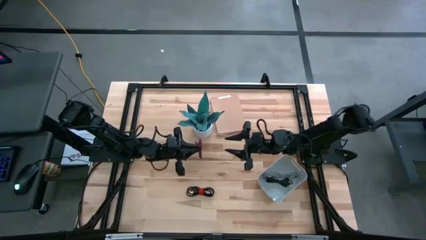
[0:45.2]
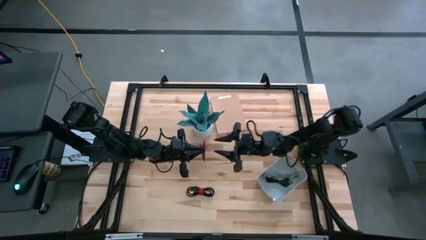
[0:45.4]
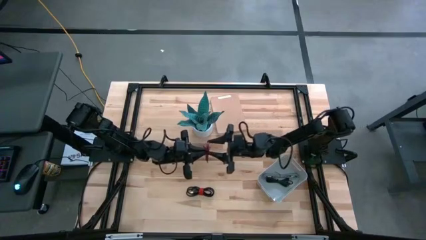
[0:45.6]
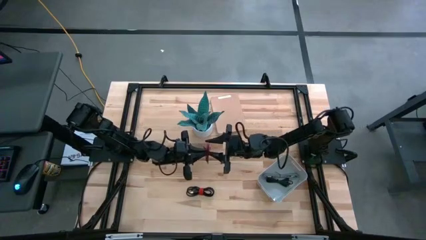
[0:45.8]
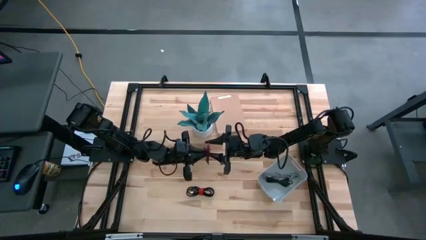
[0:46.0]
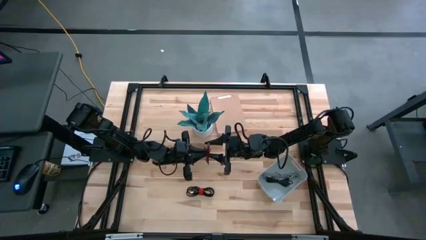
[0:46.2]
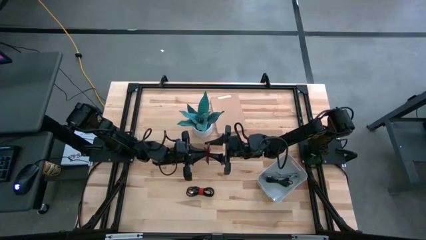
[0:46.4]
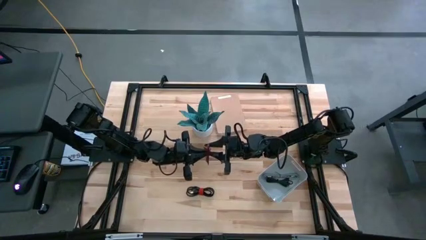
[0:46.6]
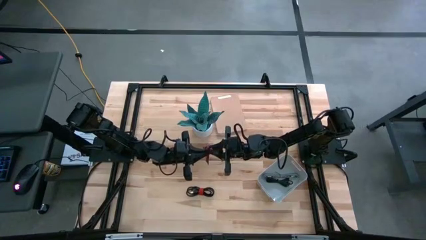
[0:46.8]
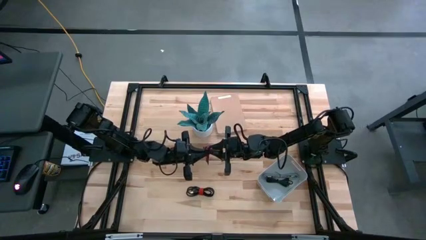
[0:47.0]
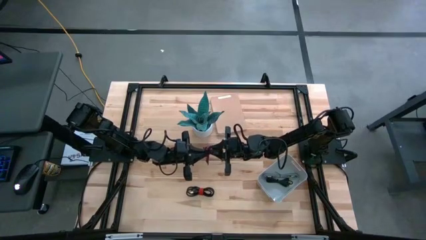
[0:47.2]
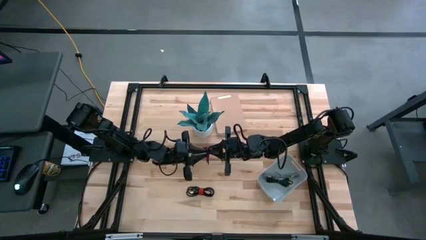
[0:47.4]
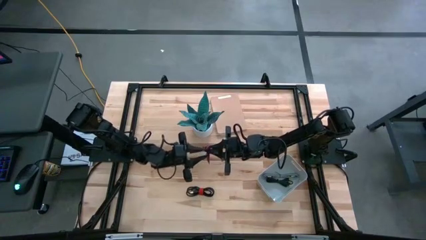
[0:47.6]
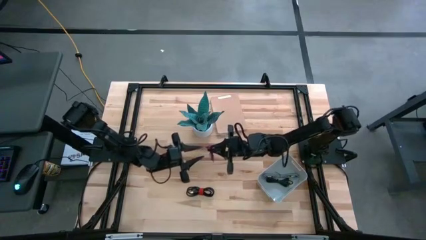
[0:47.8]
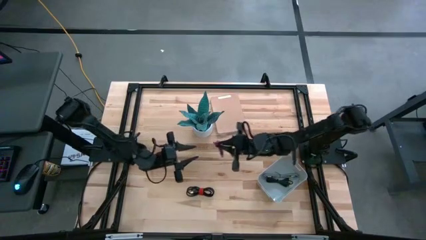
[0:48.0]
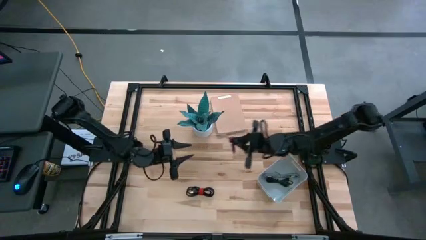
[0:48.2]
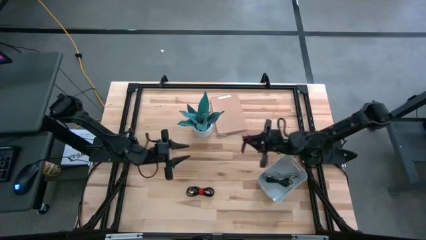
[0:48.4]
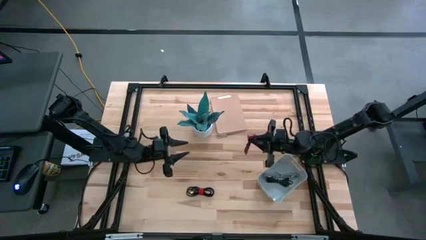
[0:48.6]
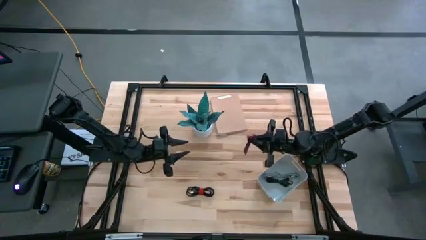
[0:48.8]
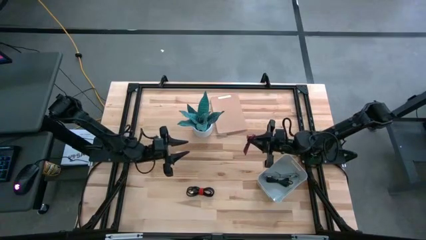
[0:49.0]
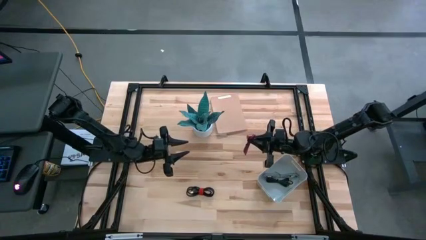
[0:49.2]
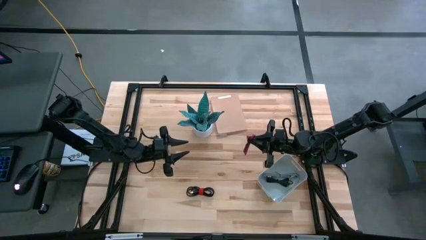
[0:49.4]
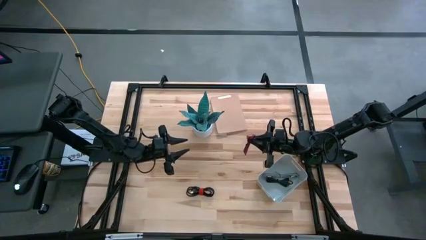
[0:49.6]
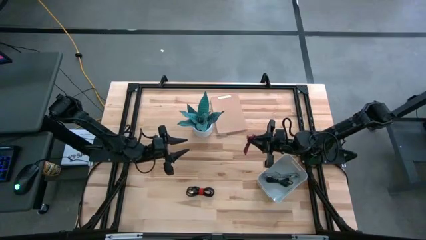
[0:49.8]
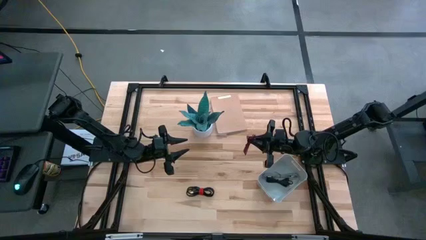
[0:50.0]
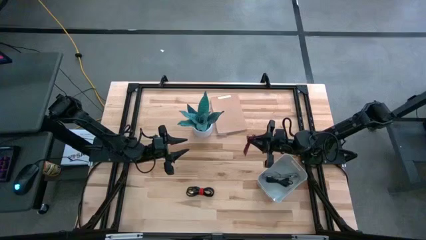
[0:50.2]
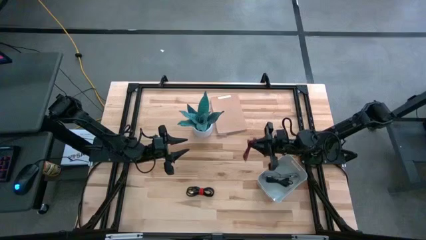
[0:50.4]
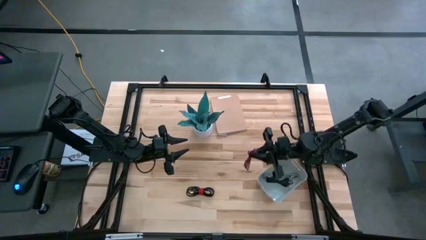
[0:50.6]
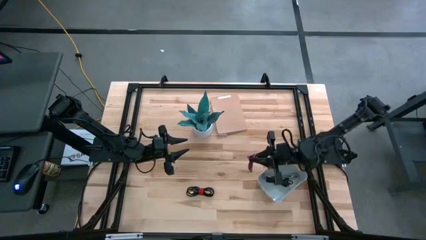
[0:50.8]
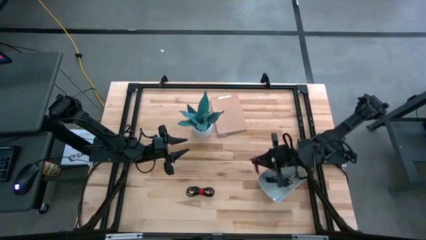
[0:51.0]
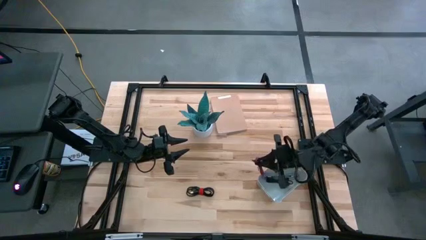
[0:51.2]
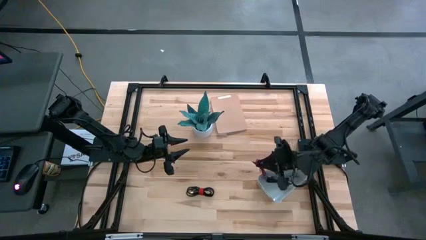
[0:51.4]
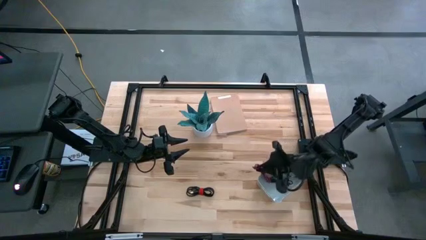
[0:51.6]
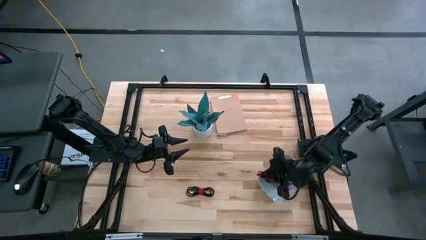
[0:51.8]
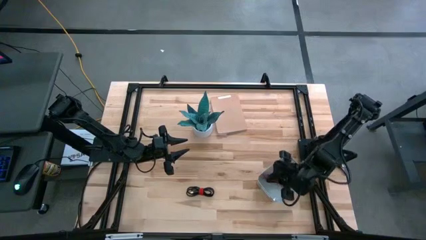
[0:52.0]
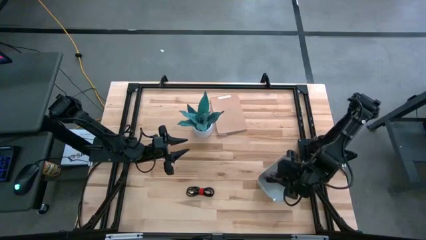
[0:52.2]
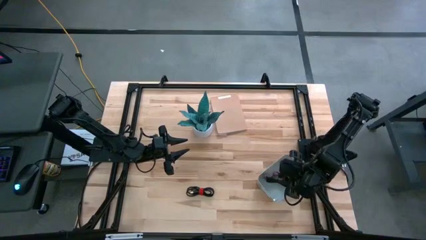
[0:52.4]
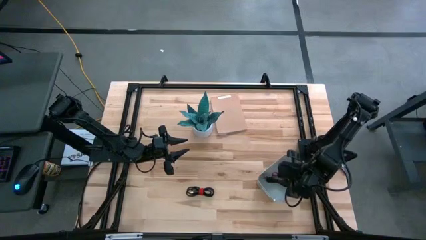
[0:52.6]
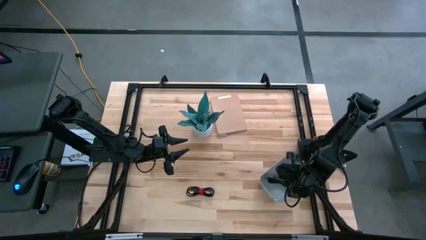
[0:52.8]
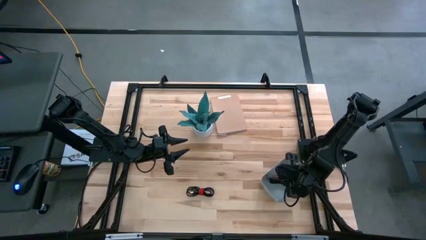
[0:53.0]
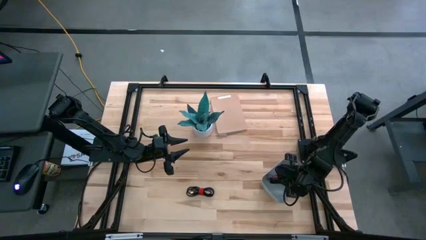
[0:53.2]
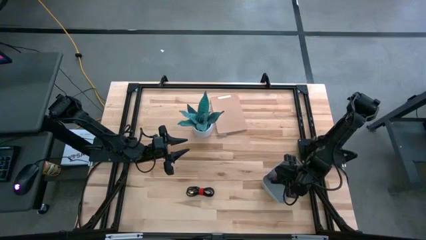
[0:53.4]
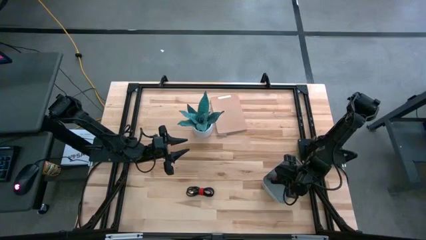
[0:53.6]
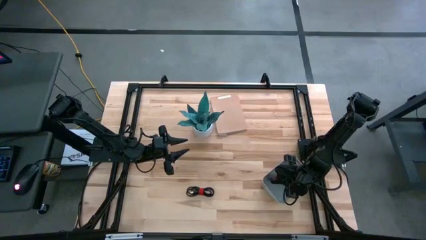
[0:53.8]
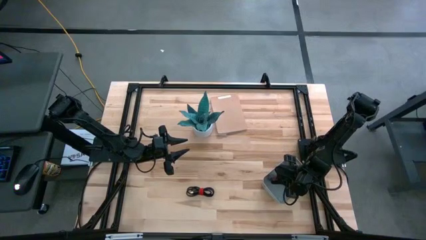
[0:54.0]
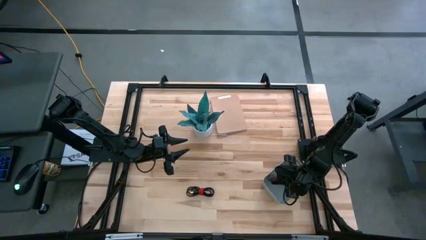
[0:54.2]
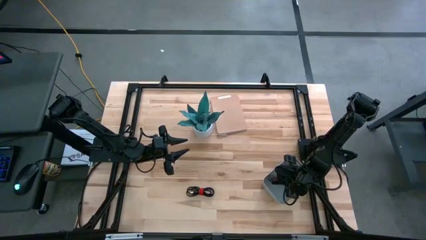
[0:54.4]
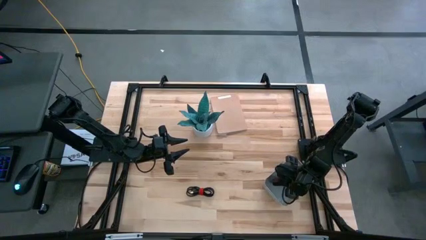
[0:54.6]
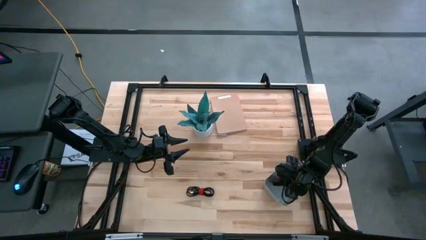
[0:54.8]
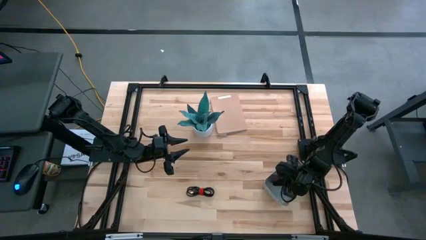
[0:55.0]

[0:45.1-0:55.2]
Task: Pick and place USB-C Cables
Put the pink charger cable into the white bin

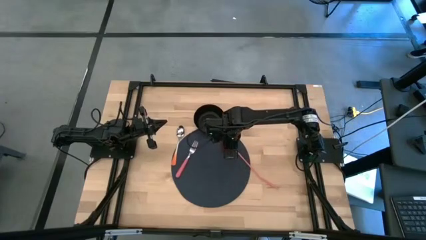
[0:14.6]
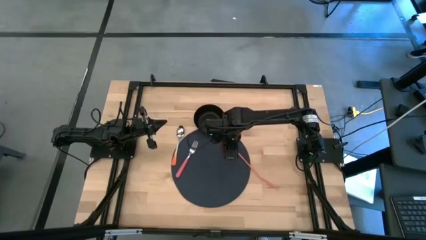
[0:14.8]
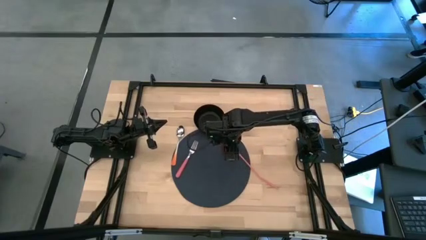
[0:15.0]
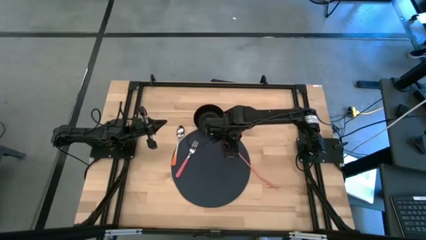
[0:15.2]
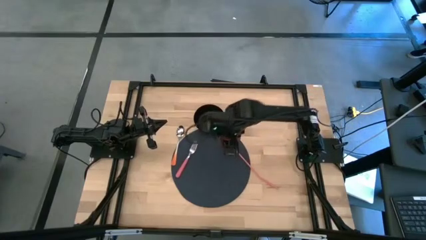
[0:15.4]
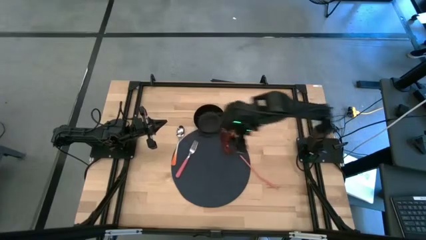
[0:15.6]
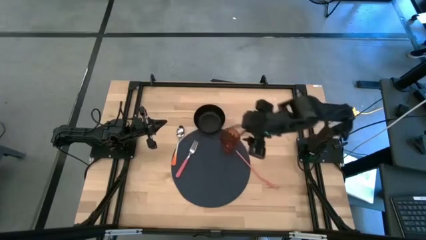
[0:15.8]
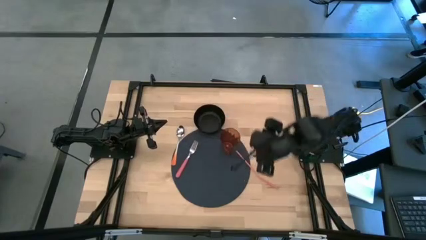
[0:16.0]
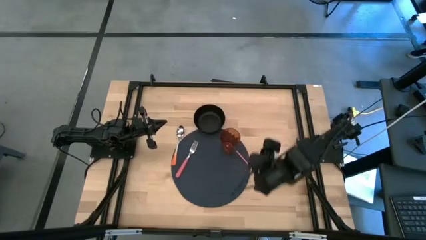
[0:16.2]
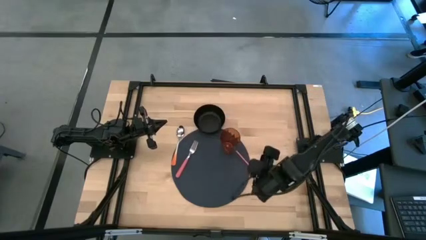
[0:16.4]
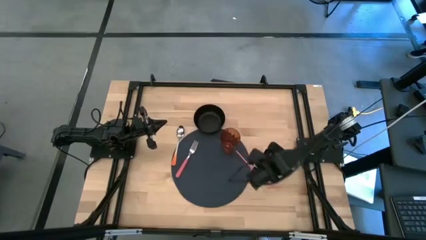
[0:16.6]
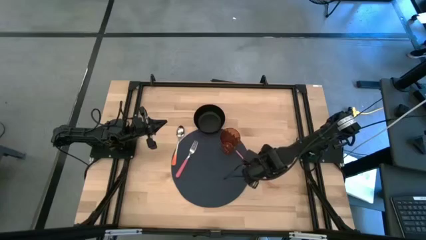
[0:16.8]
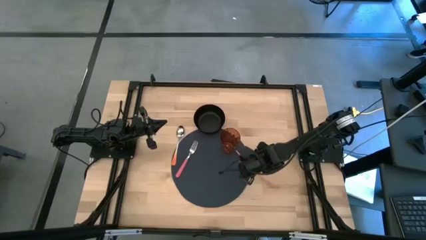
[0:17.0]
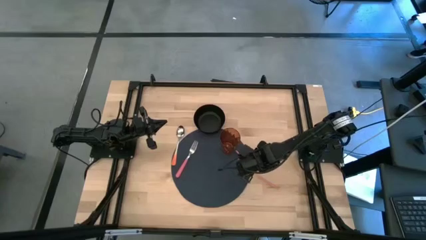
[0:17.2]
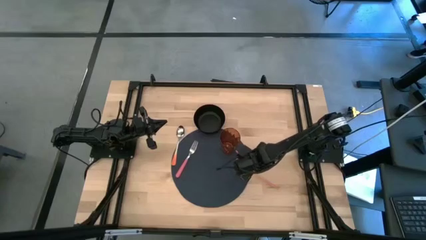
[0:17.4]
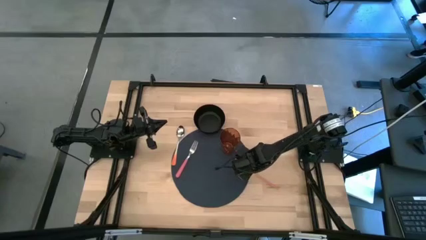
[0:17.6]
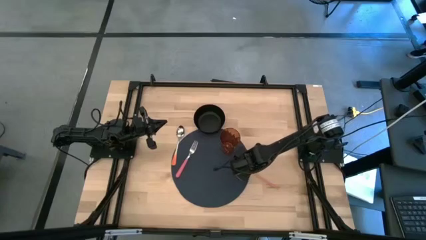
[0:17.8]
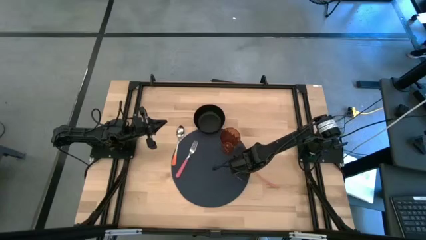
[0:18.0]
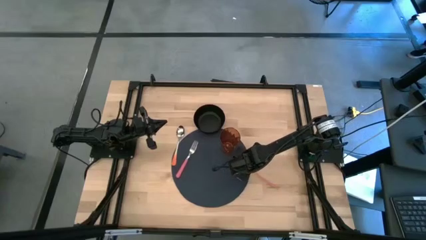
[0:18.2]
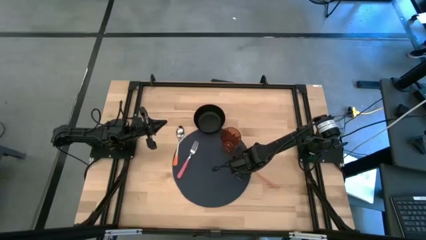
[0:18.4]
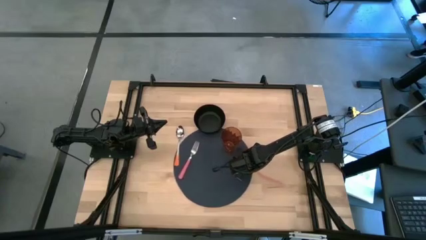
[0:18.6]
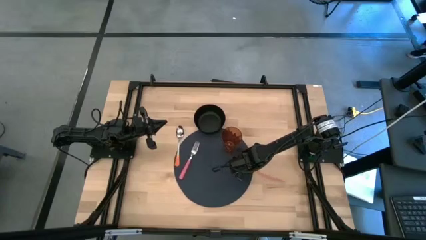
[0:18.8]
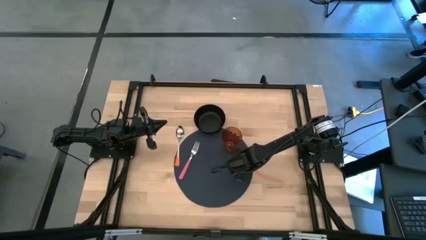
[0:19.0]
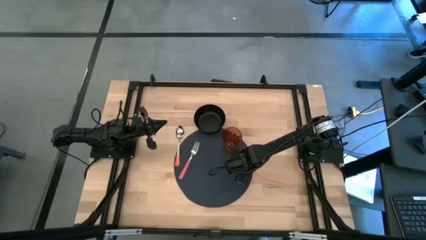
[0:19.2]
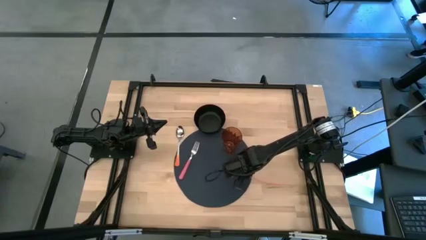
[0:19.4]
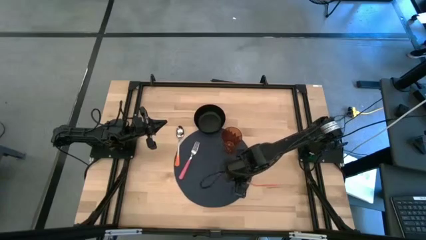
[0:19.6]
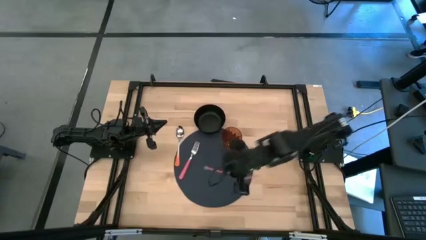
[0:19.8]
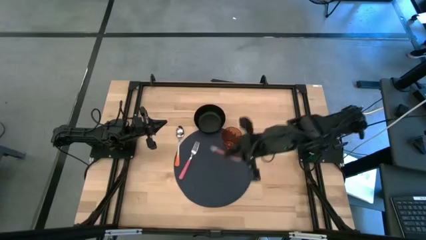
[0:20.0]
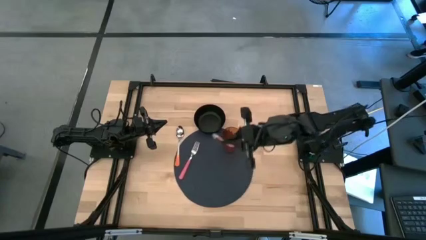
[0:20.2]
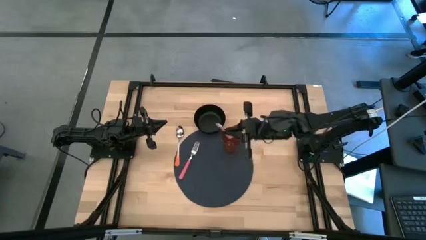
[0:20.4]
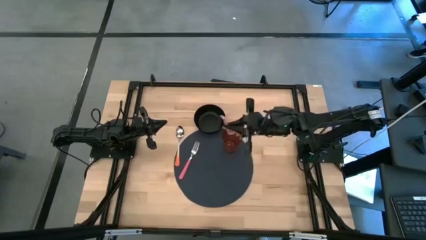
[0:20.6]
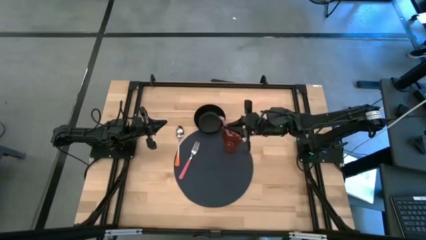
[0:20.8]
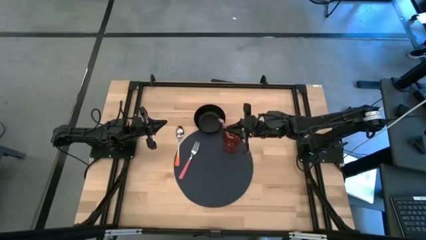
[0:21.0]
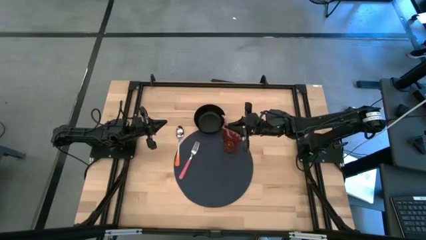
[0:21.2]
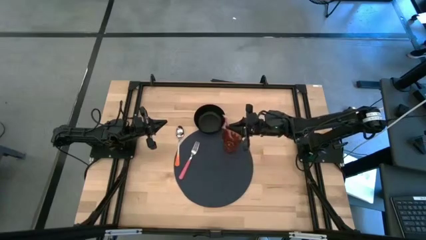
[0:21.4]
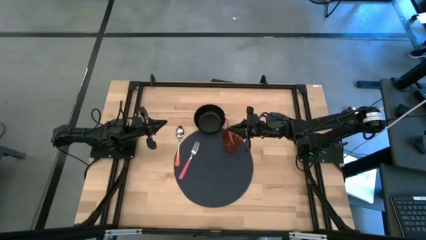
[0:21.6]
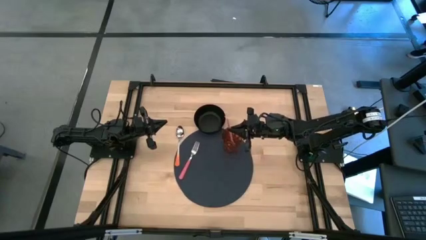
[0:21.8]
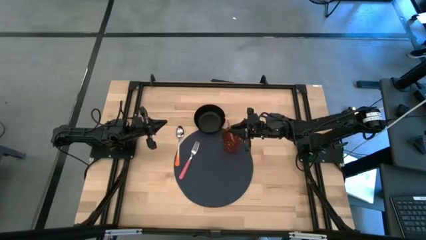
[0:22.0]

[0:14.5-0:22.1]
Task: Pick & Place Utensil
Put the orange drinking straw into the brown cup
